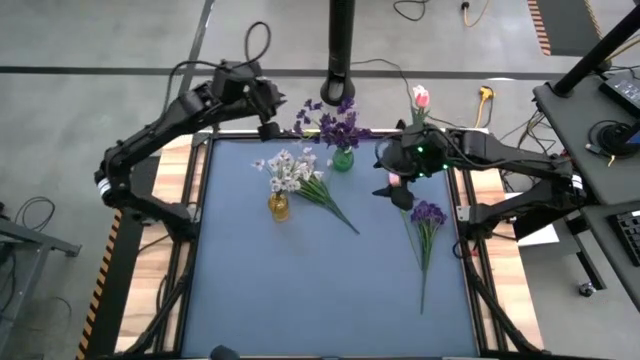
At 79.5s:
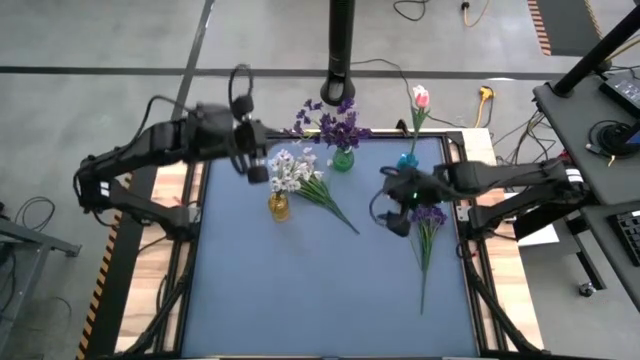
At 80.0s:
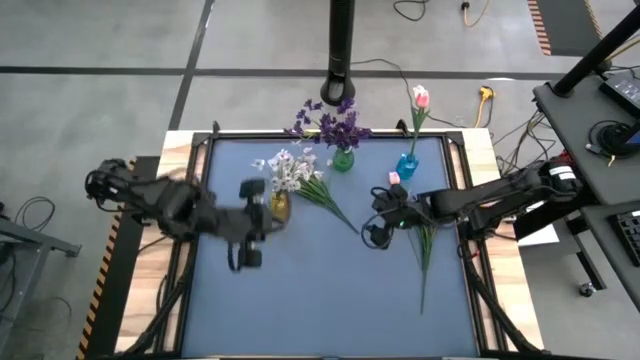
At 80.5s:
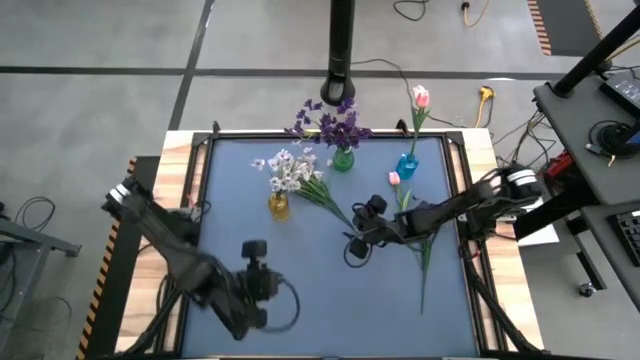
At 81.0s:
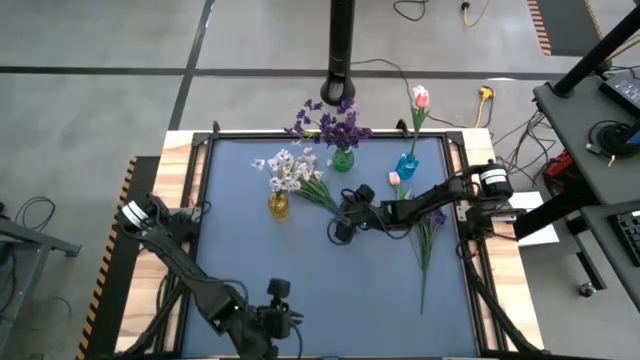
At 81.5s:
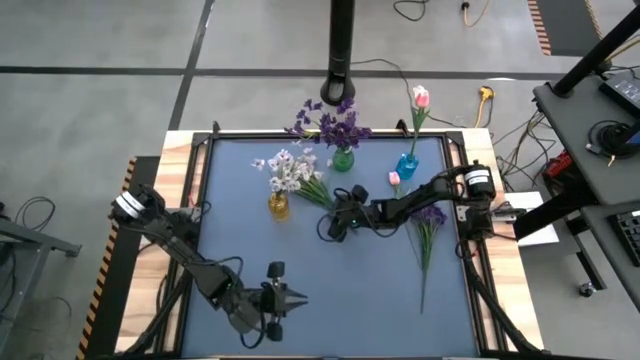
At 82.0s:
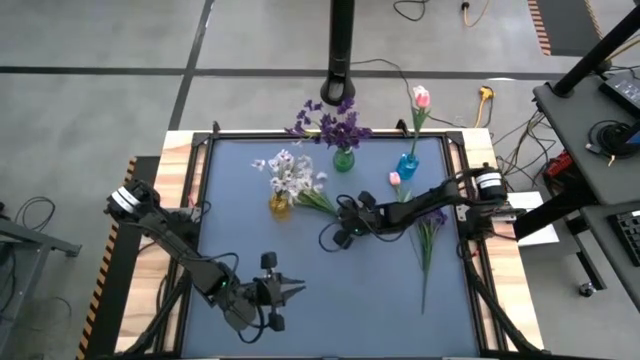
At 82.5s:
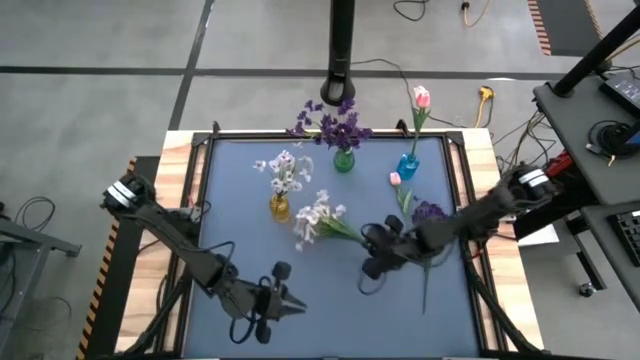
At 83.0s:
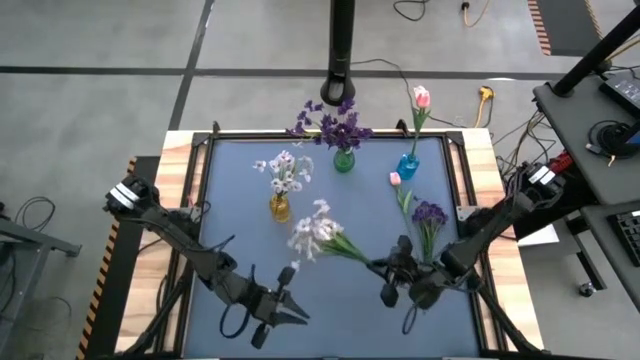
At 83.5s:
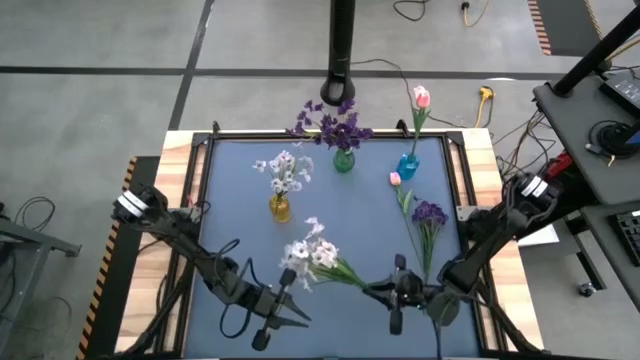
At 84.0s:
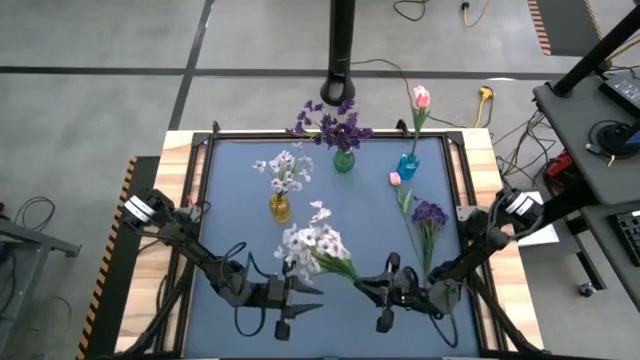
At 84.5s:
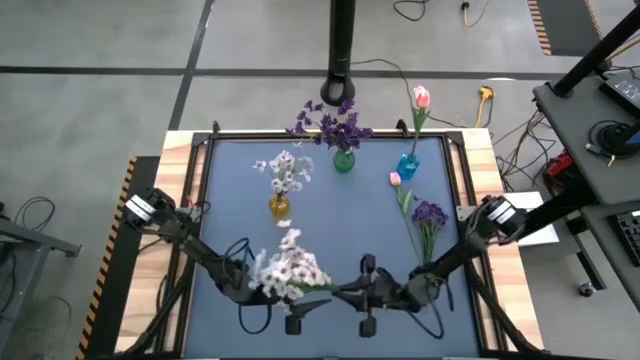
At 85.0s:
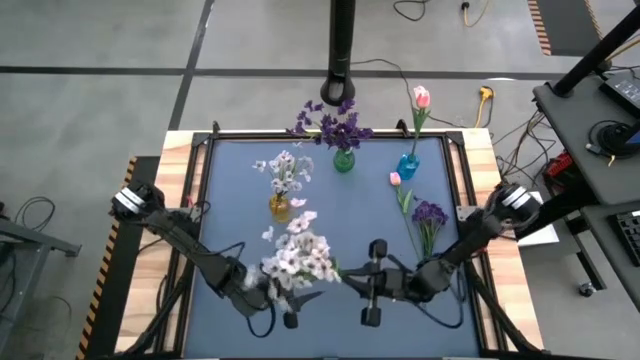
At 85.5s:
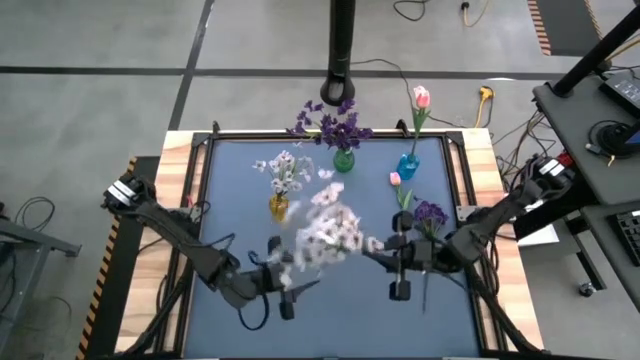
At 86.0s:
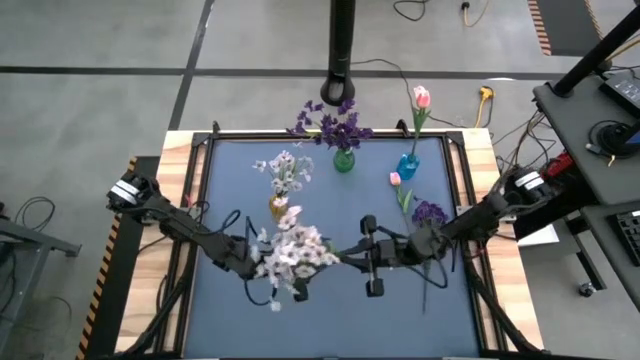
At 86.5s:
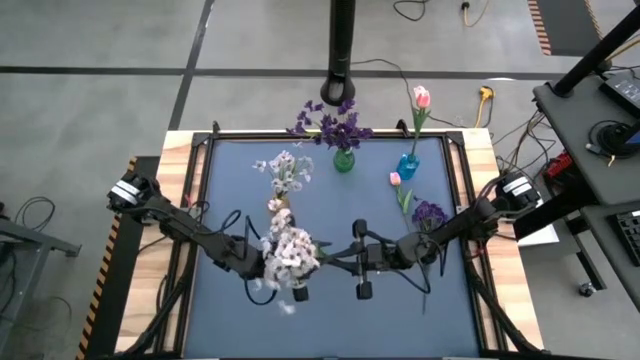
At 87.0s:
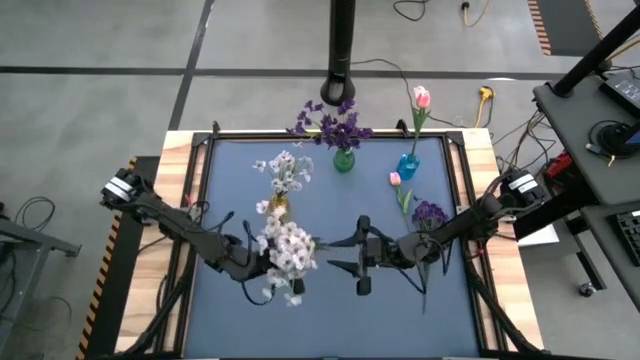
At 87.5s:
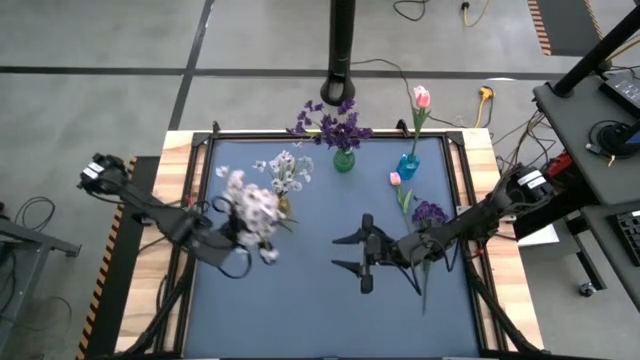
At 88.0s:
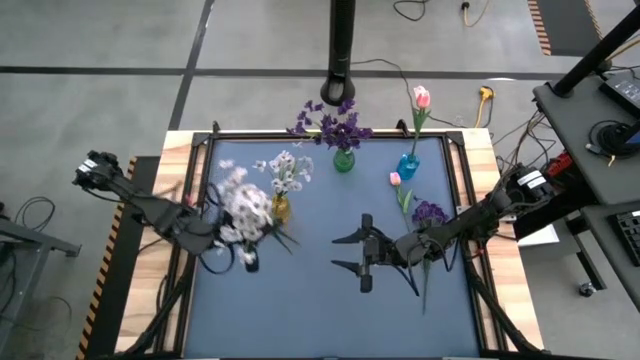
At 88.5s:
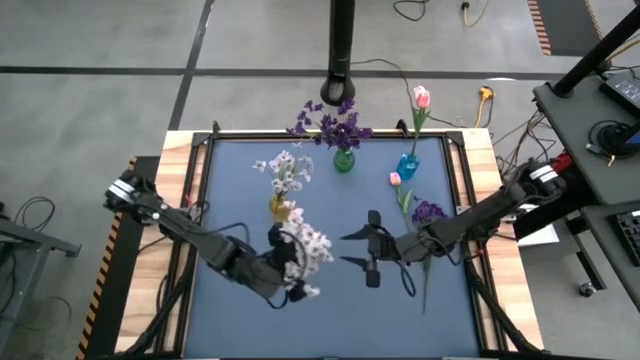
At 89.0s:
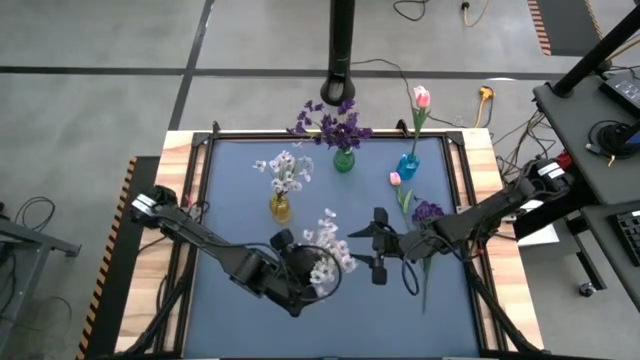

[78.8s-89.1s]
Task: Sort flowers into vase by color
Put the white flowers into the yellow vase

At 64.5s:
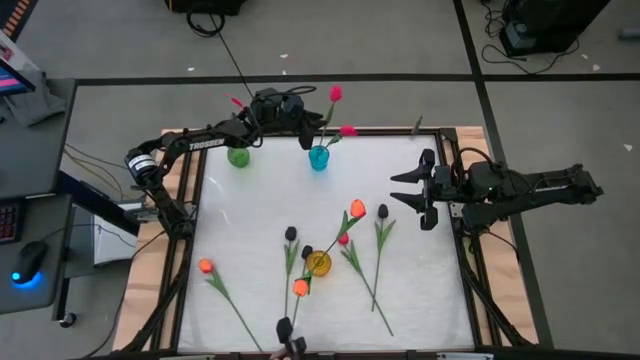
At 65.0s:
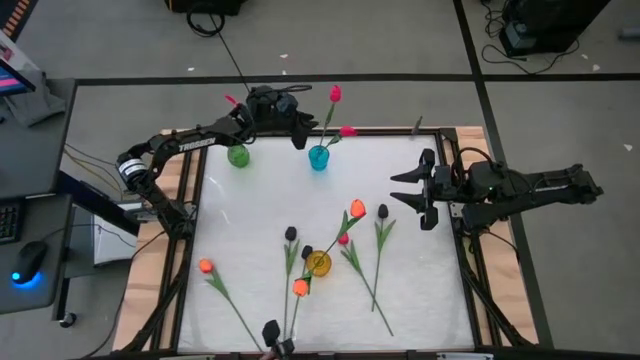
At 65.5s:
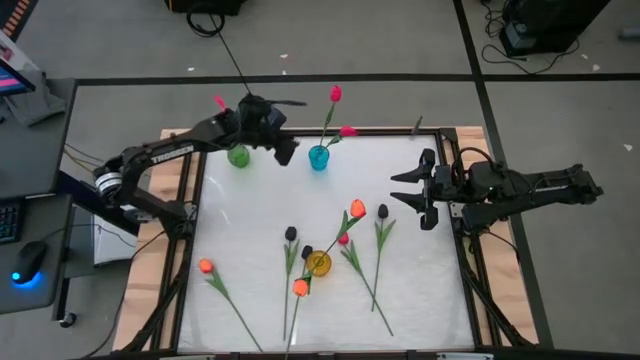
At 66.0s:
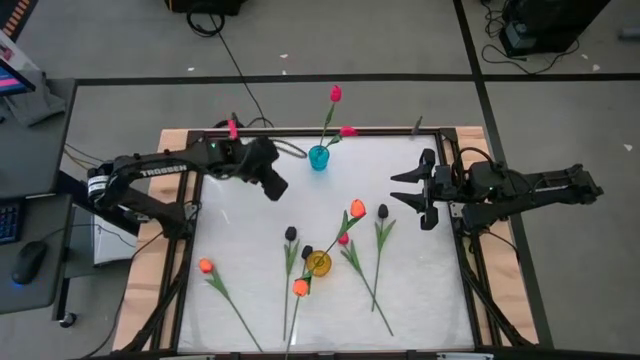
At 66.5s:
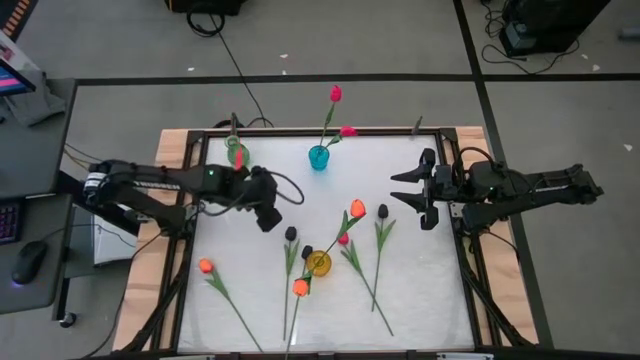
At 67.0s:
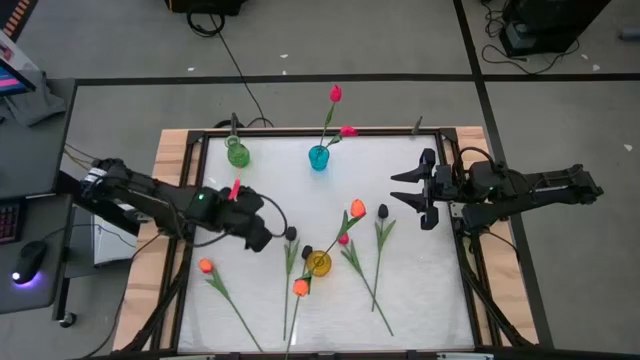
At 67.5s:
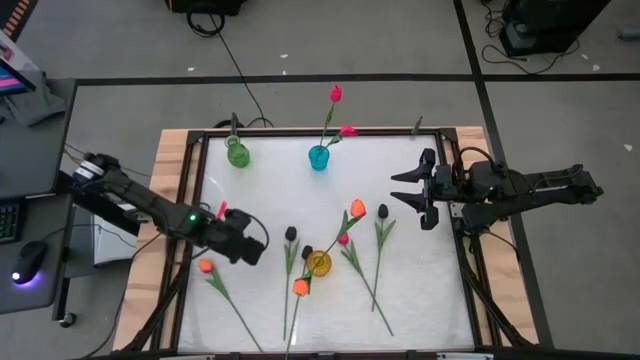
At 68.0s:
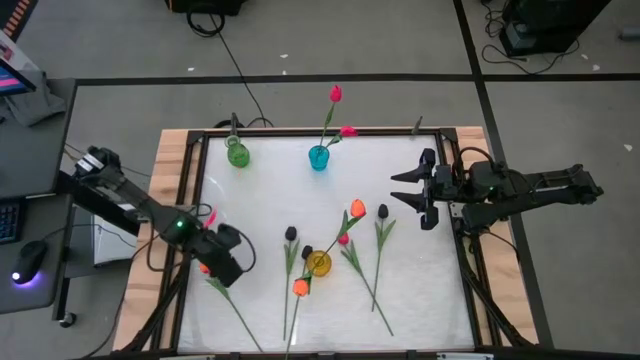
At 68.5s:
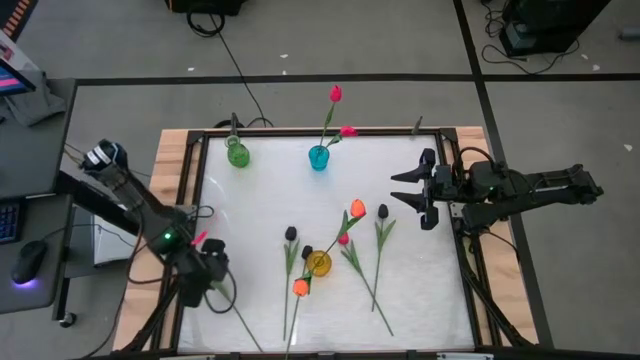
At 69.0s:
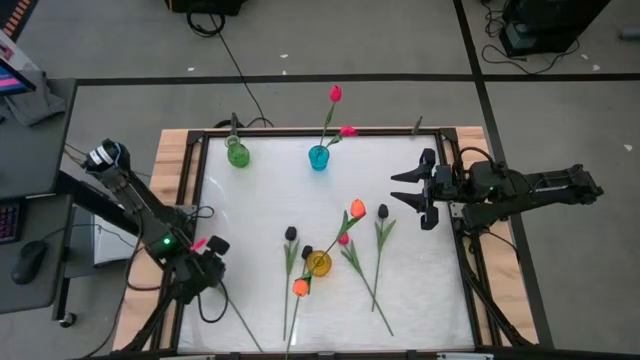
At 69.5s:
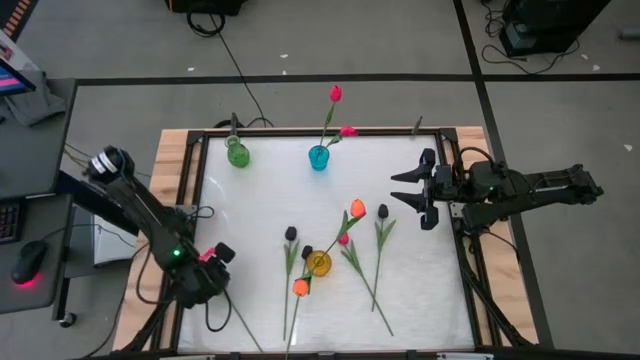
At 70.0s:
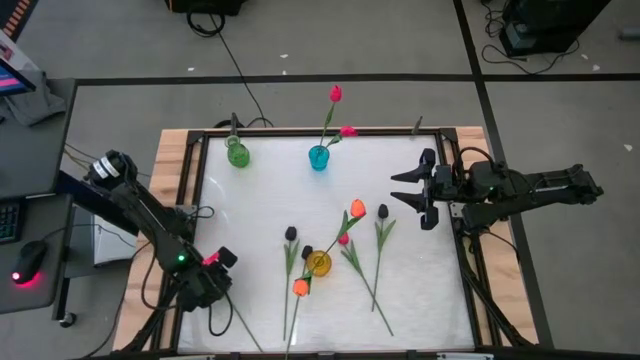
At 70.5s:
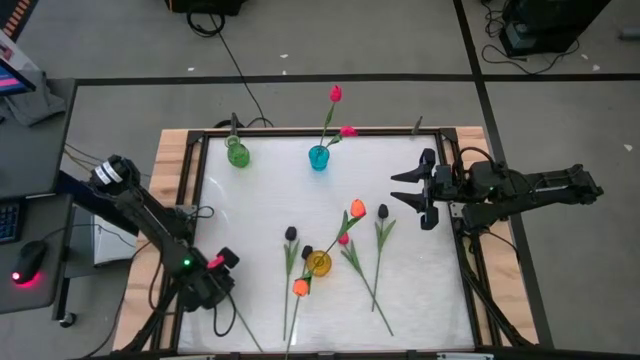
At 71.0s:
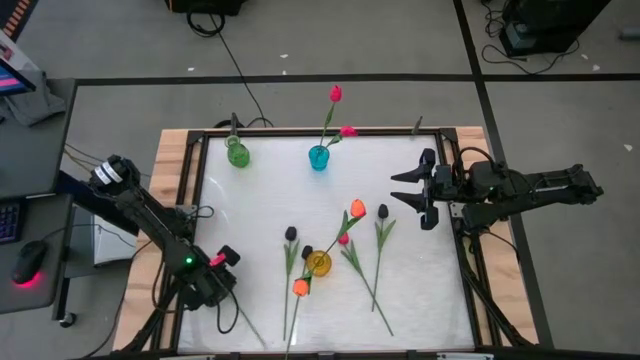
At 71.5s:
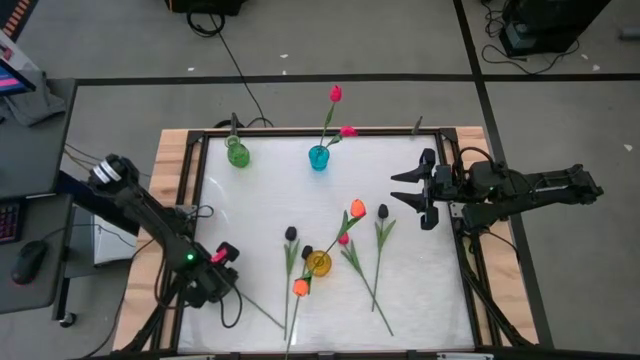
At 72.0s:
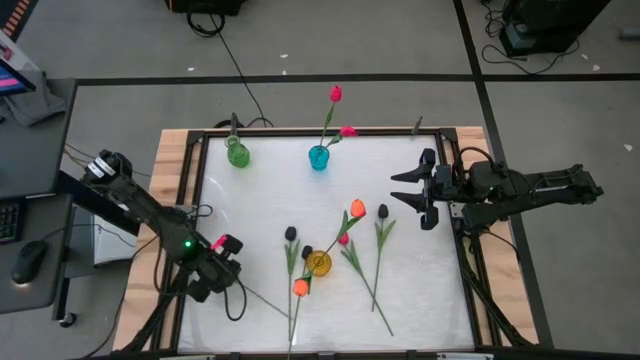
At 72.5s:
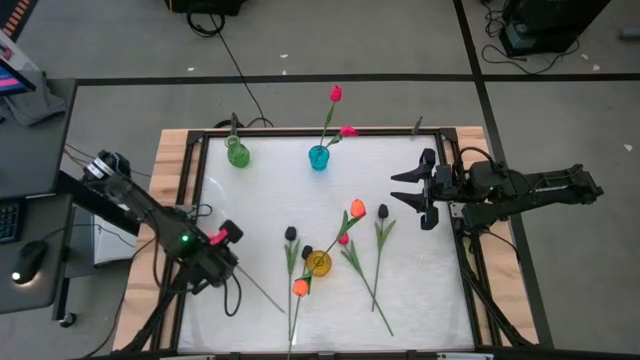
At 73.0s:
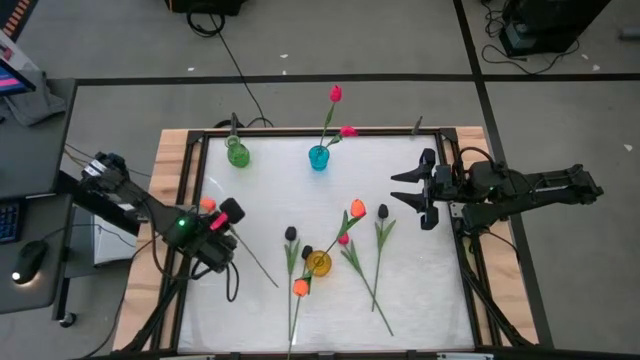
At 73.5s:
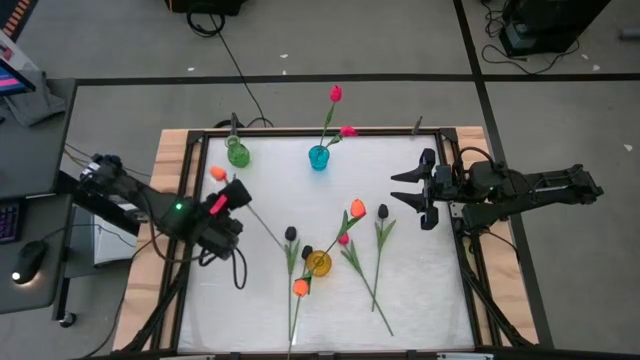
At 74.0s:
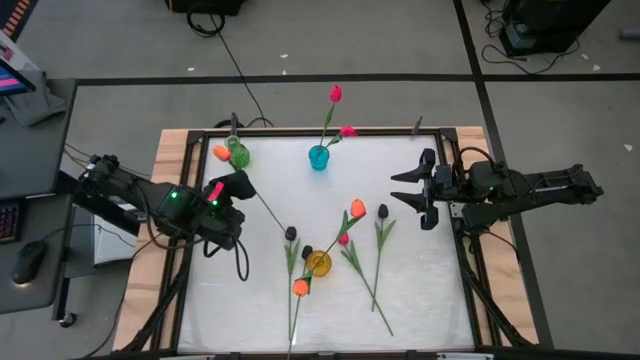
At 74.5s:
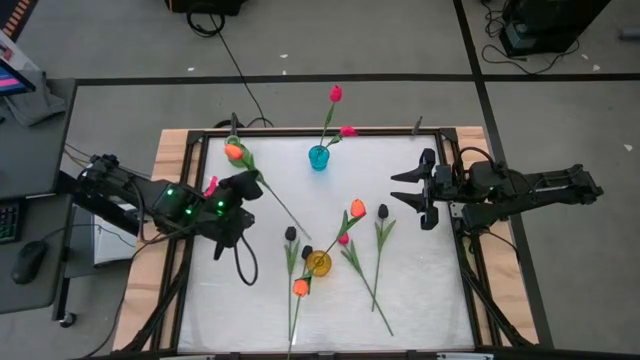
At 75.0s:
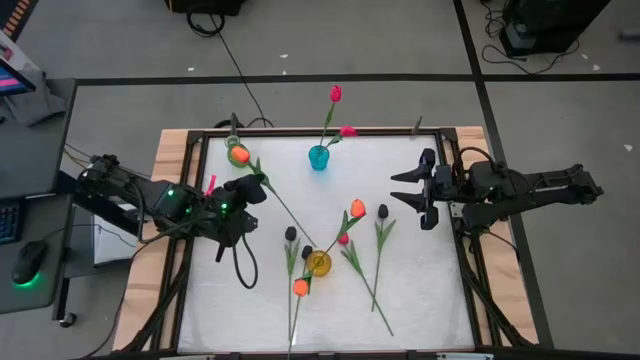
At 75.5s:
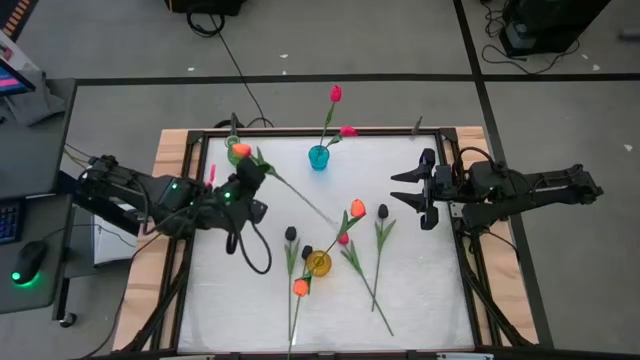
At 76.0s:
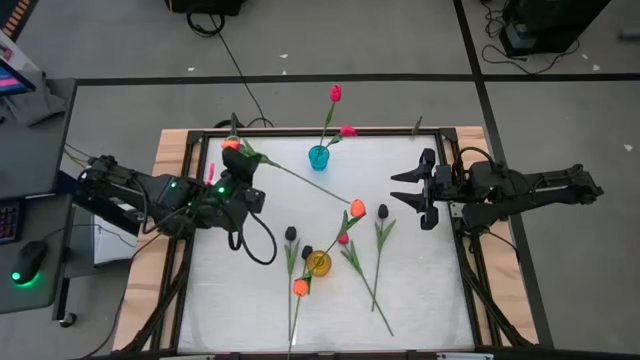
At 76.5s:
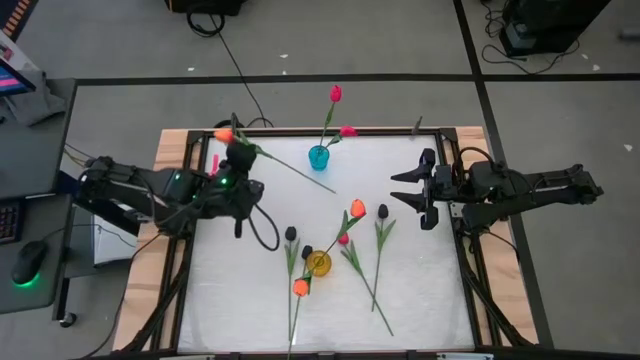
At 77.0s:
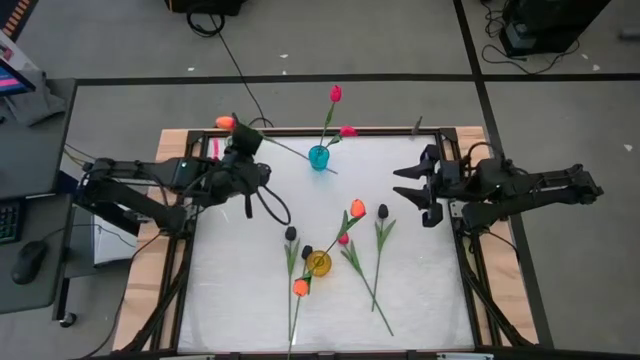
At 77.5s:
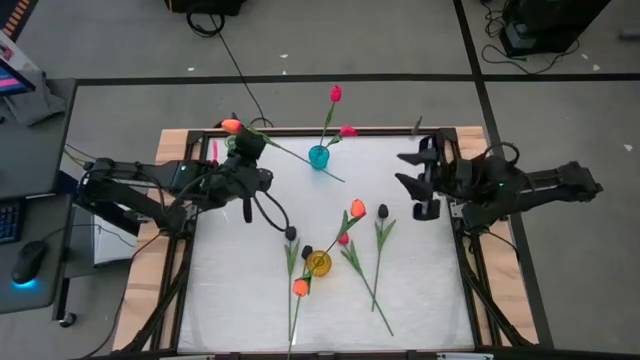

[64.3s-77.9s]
Task: Sort flowers into vase by color
Put the orange flower into the yellow vase
